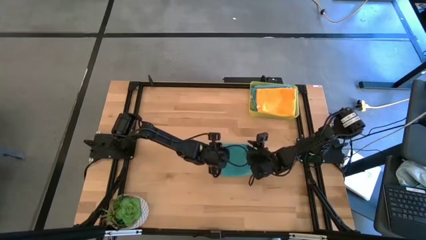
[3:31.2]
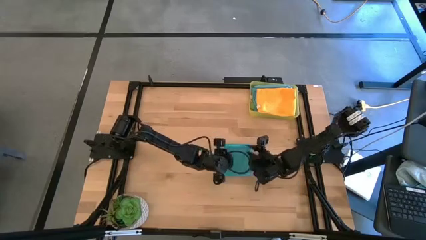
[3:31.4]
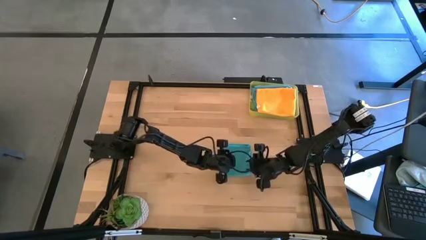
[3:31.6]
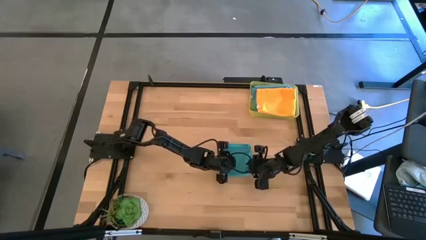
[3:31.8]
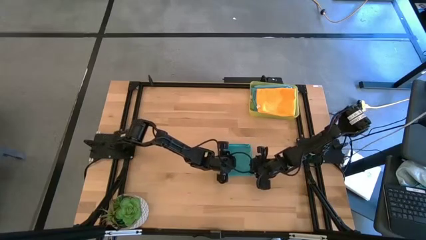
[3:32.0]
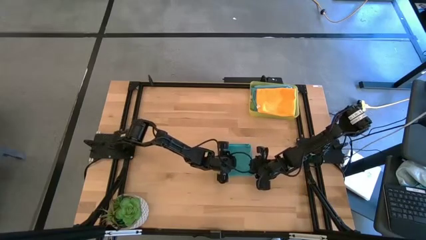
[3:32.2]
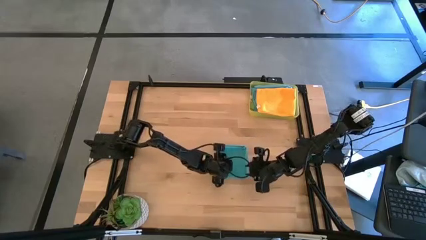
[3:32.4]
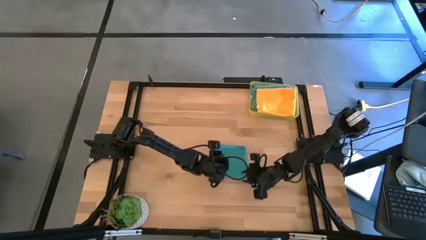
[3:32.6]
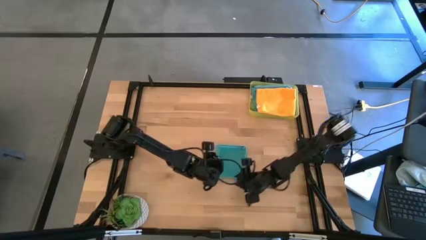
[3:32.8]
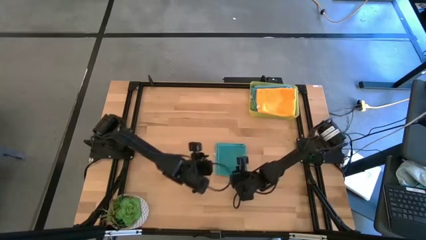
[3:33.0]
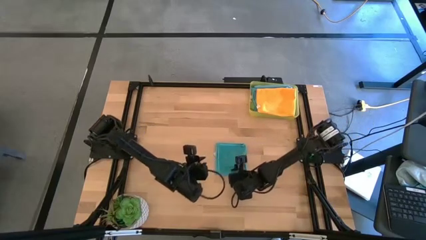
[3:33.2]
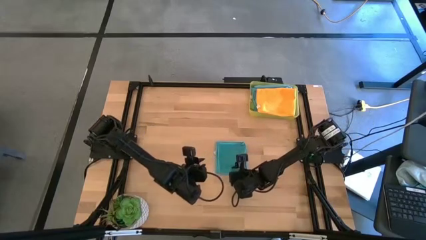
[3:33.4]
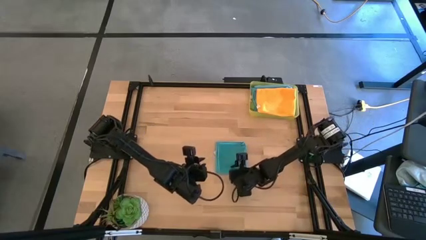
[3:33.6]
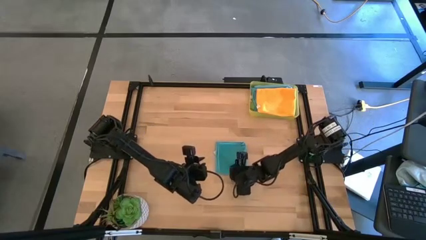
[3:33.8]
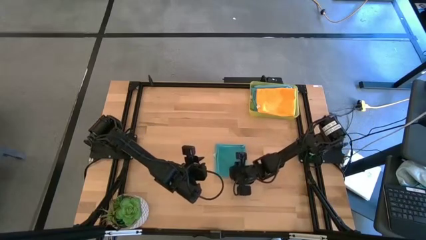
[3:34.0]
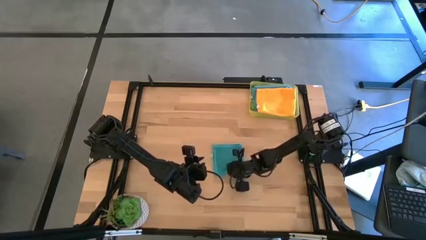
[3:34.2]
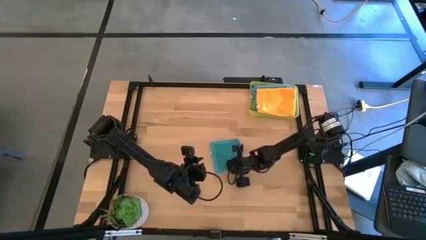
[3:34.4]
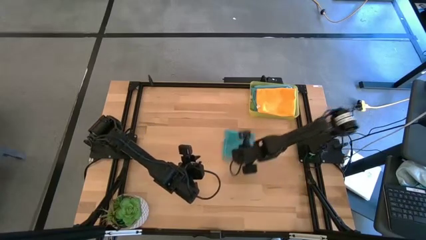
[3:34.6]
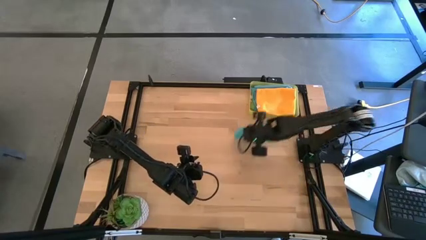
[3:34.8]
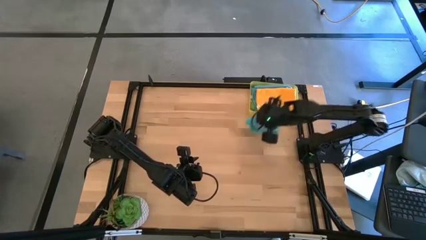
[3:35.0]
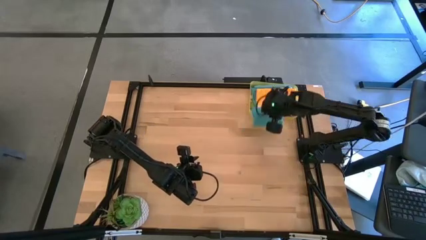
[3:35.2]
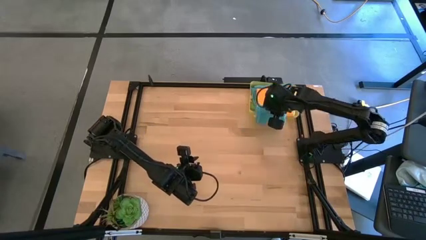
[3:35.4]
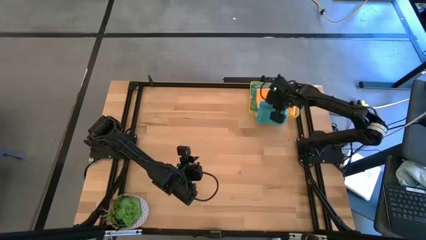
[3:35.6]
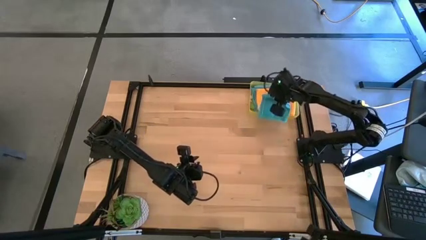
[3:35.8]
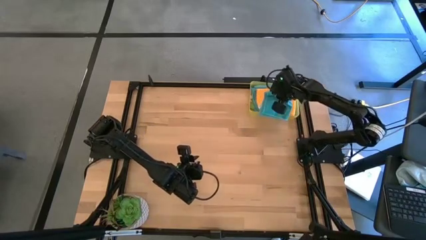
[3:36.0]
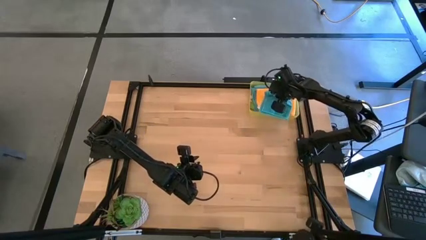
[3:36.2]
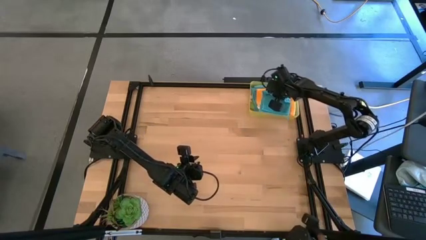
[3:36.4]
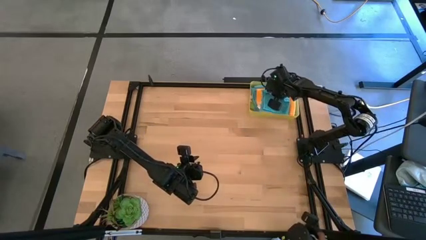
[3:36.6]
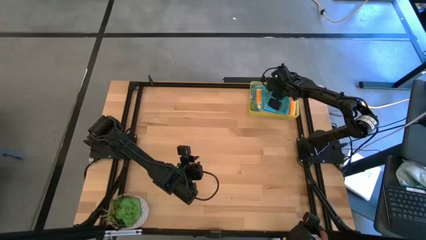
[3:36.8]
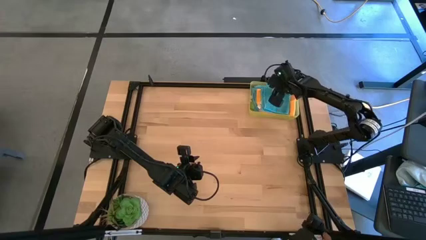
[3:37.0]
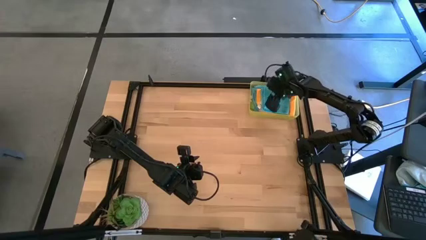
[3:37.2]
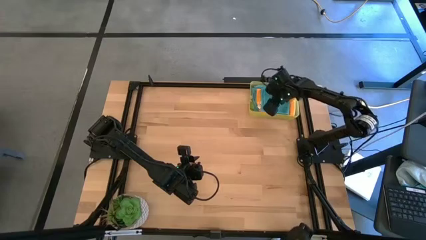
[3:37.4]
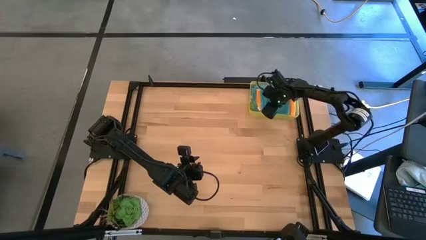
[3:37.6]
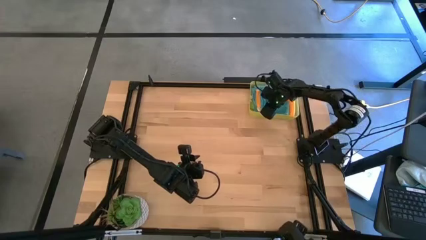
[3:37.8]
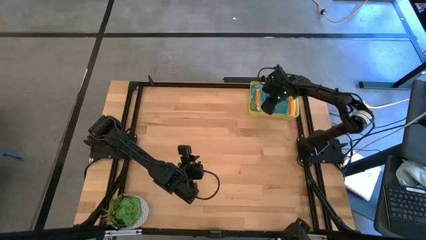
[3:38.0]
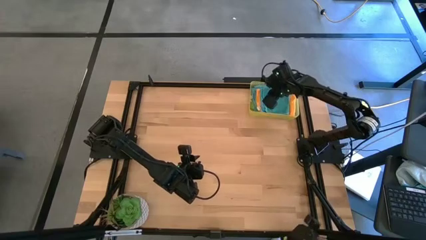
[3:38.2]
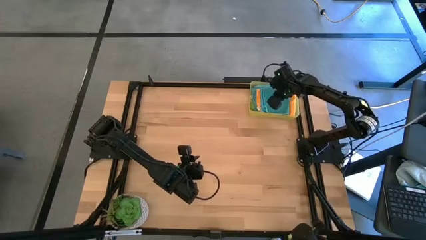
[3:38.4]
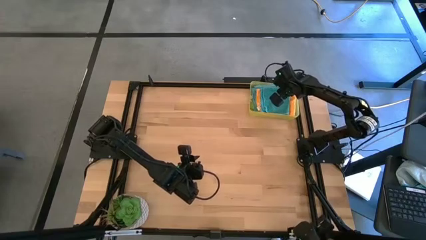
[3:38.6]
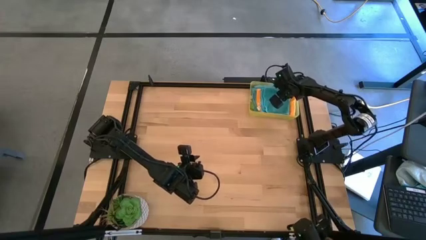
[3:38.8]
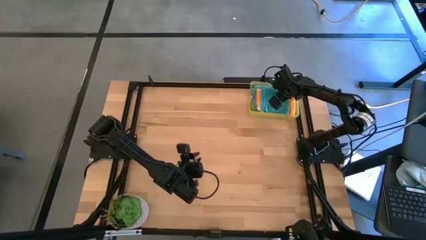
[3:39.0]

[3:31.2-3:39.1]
Task: Fold microfiber towels
Put the folded blue microfiber cloth into the yellow bin

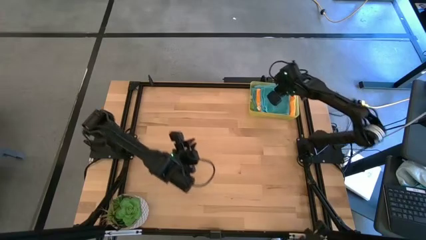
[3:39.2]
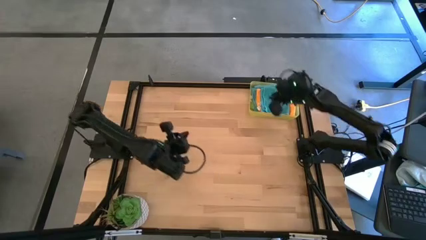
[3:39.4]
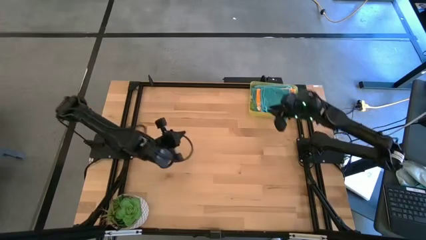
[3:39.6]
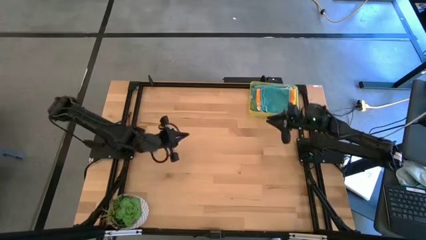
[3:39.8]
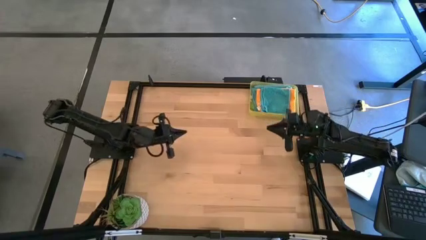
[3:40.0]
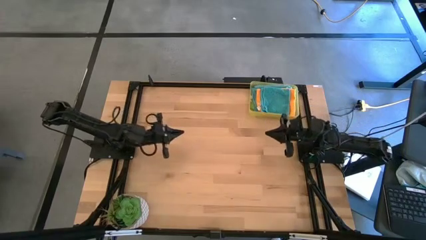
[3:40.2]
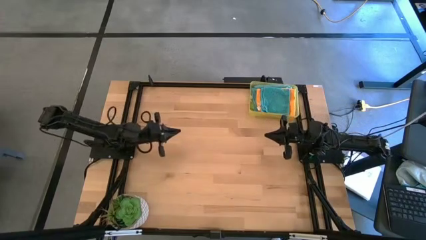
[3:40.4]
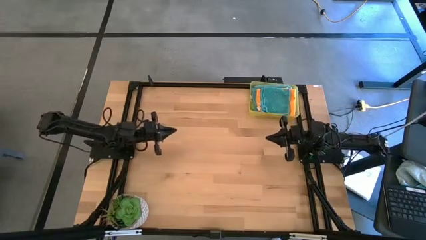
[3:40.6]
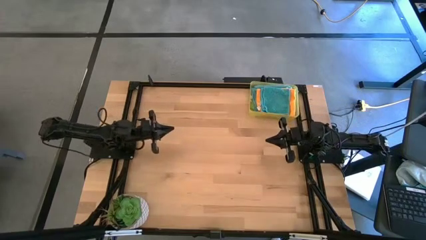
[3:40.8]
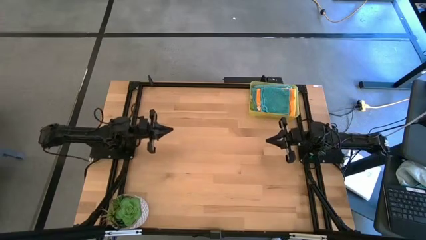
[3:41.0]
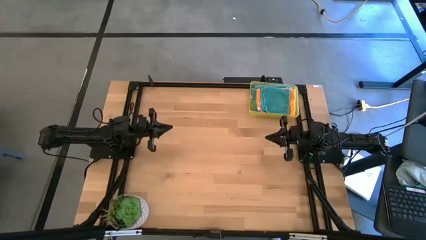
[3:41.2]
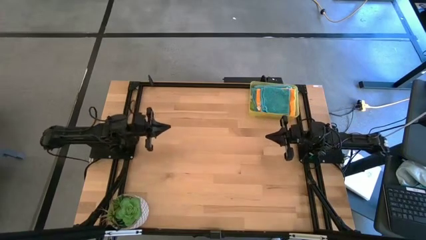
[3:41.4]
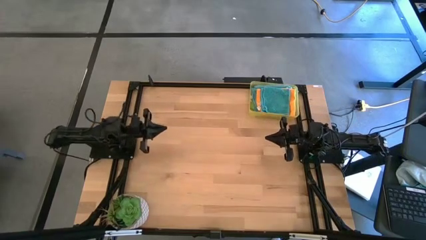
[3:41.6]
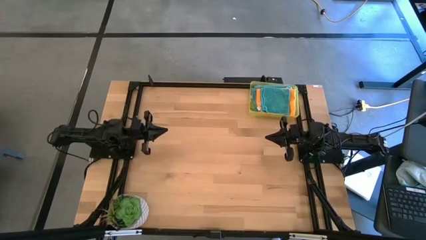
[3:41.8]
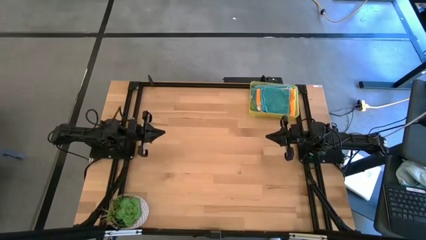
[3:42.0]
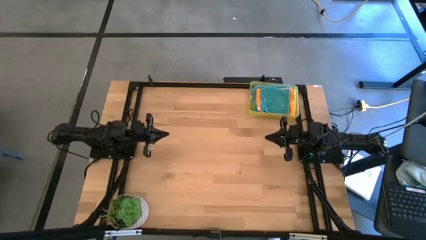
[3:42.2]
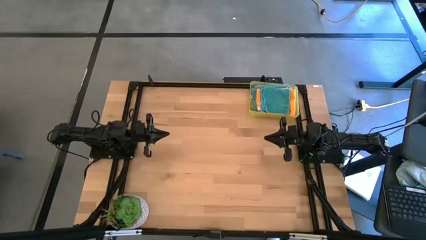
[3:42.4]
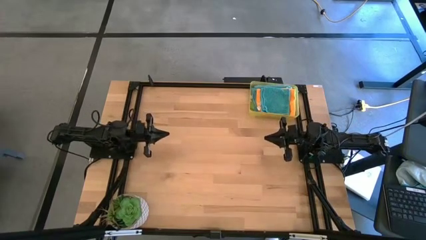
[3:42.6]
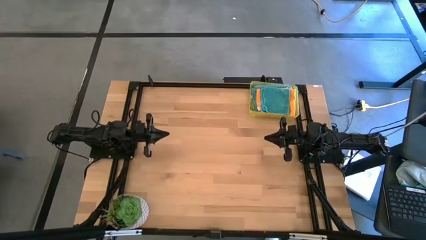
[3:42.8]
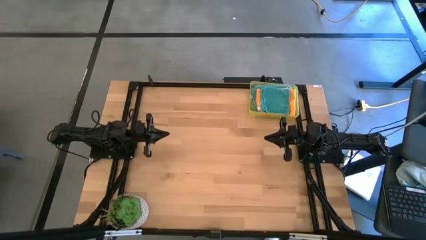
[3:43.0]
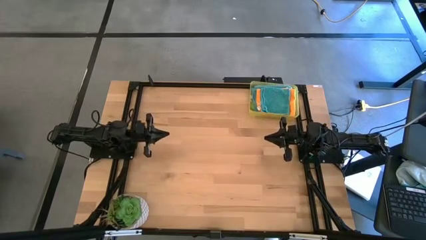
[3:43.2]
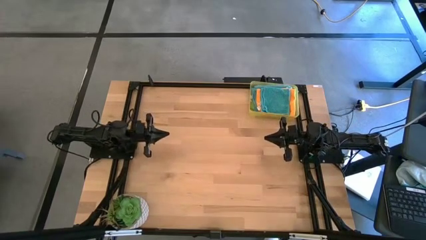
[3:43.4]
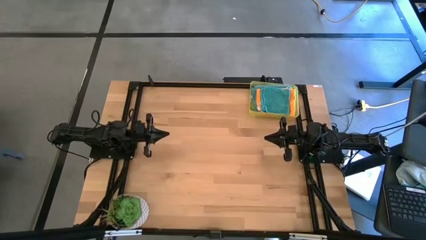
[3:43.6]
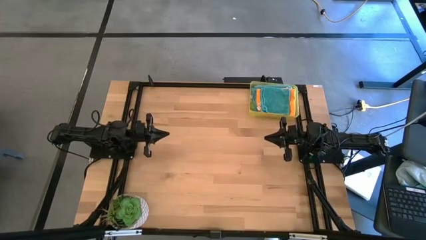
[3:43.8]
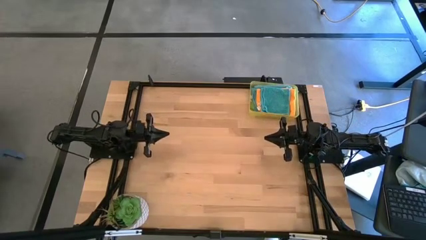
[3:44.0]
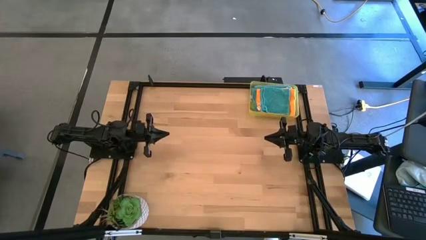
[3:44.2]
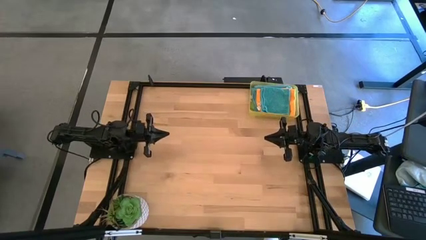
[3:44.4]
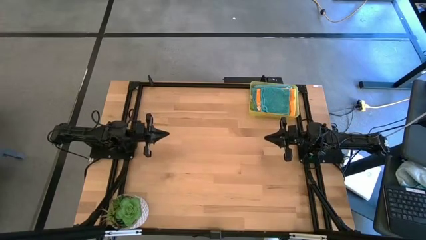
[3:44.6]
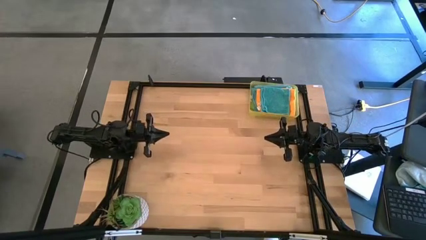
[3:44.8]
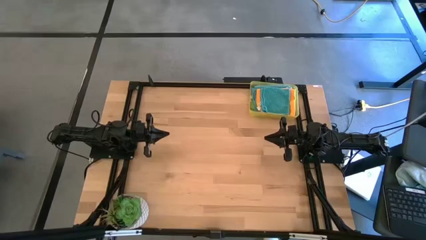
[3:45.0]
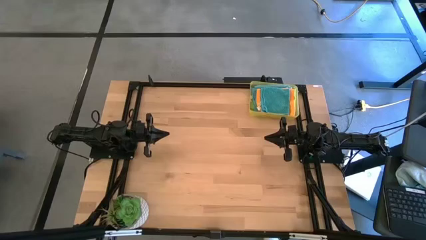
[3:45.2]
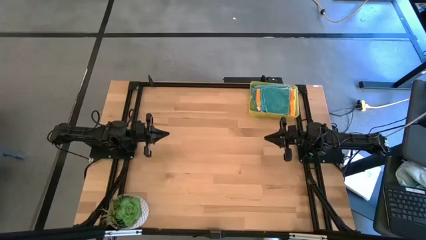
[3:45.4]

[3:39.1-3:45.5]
Return to Home Position
